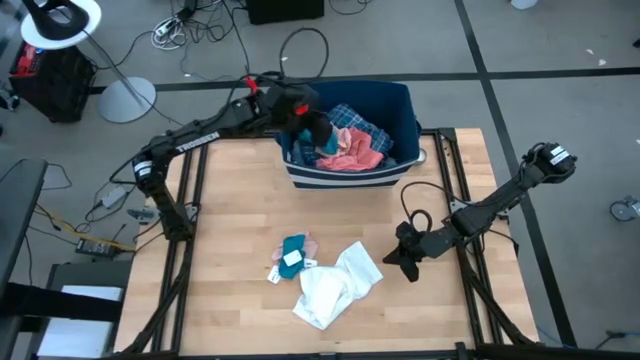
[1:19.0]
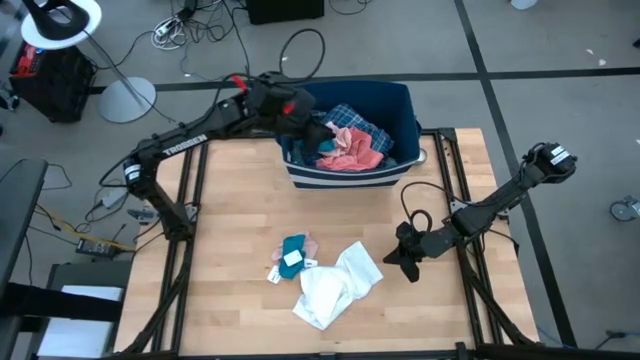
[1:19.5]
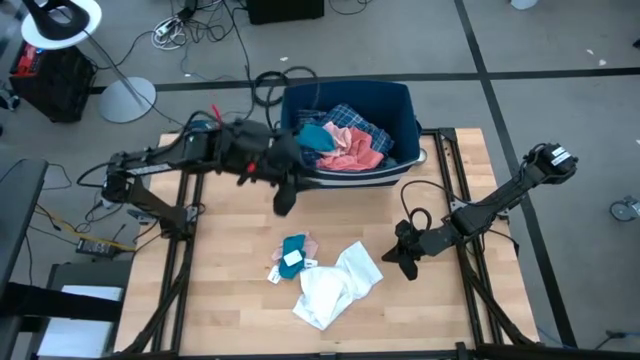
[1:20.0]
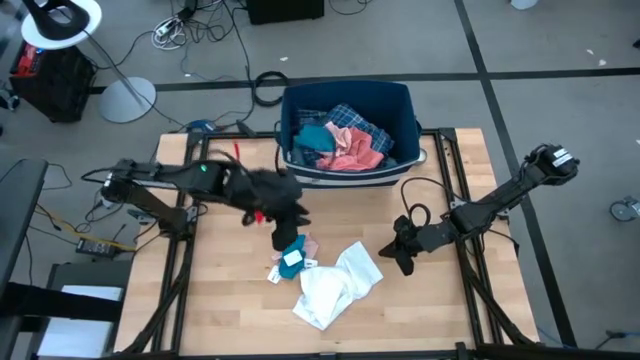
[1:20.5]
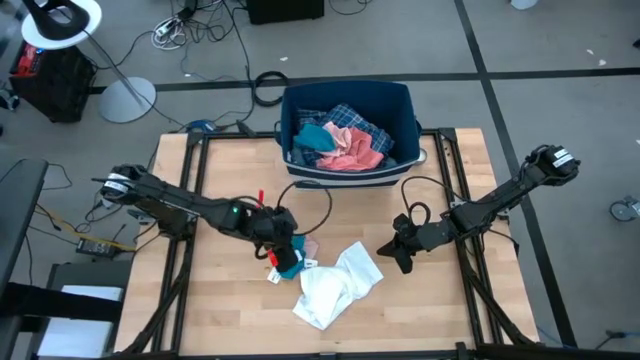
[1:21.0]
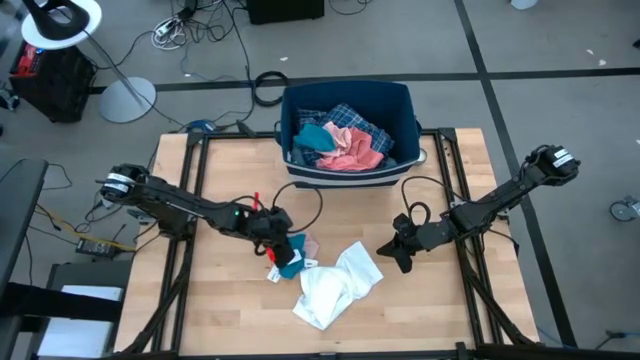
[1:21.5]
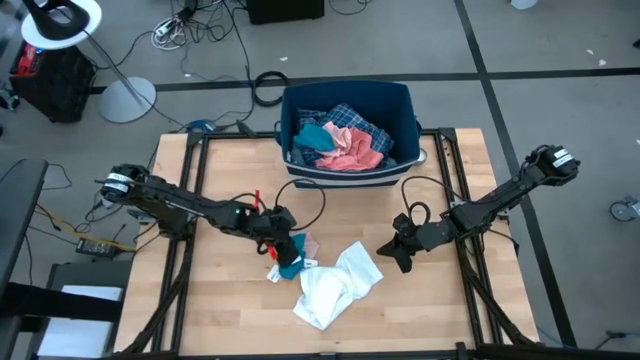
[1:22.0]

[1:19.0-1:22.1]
Task: Sort clothes
Put the blue socks into the blue bin

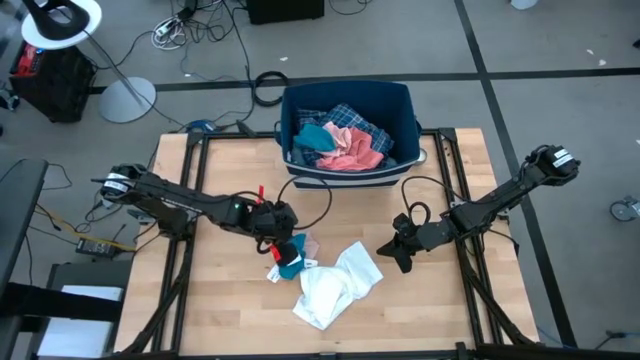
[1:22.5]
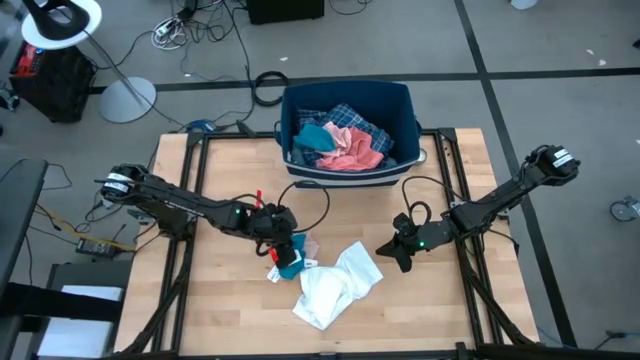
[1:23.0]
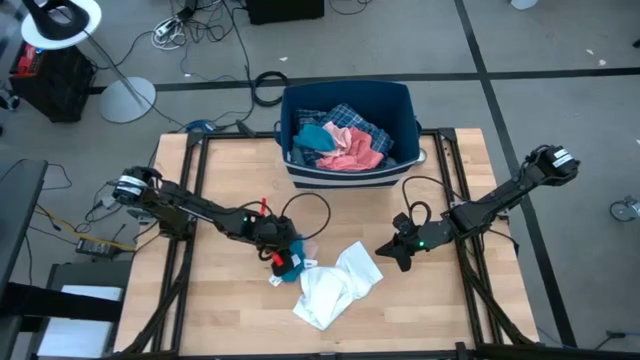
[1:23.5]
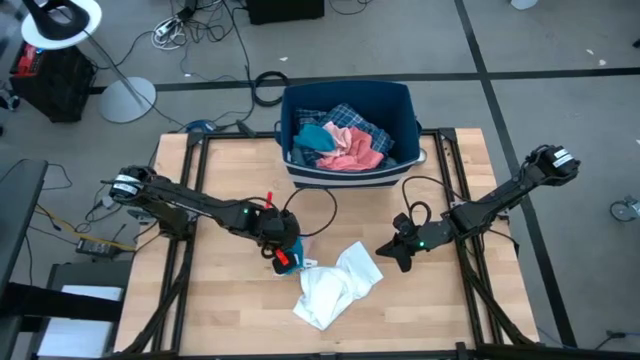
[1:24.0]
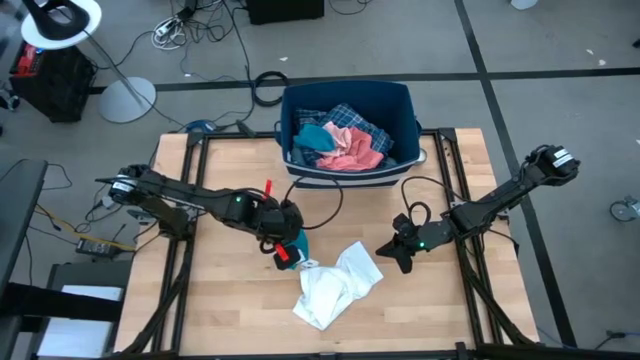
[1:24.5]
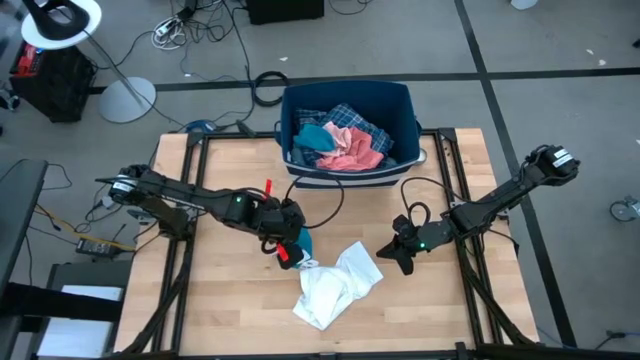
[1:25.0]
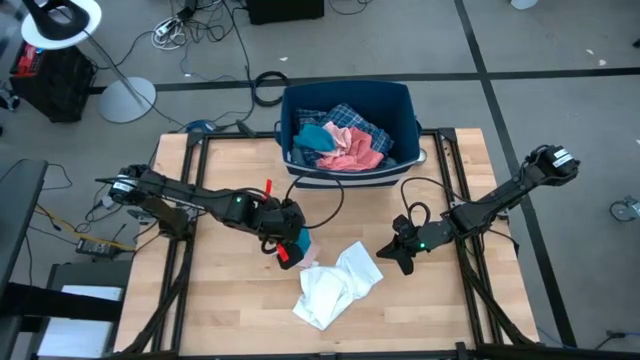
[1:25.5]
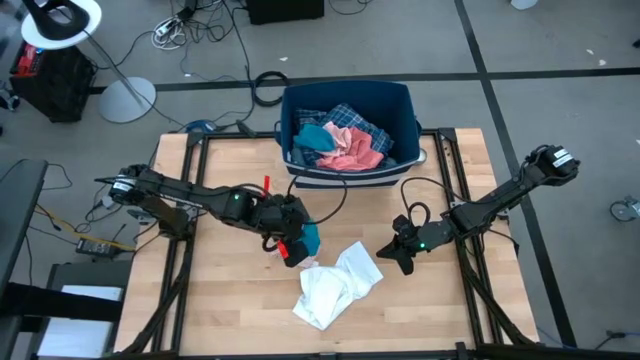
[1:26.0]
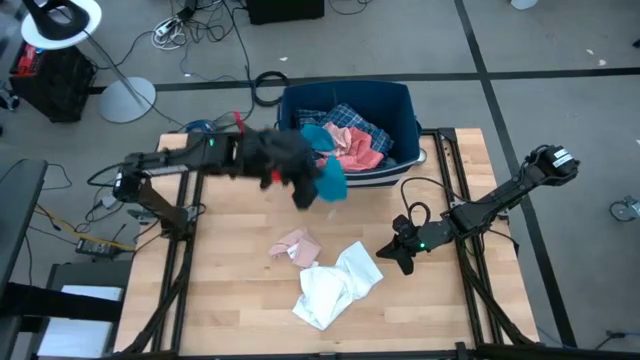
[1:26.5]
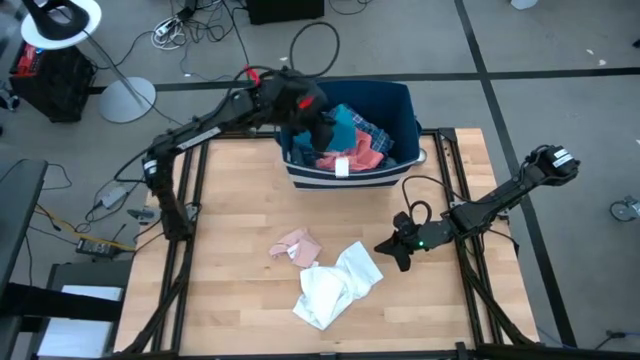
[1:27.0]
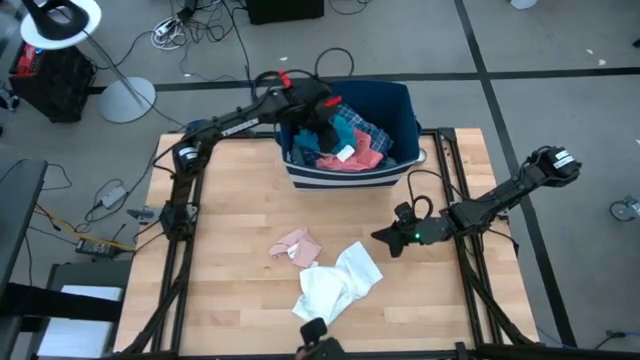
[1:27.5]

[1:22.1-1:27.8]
Put the blue socks into the blue bin

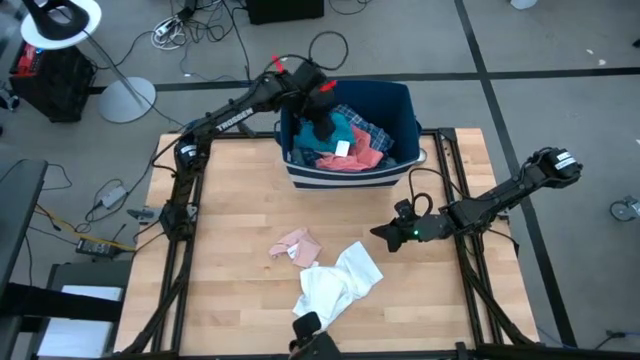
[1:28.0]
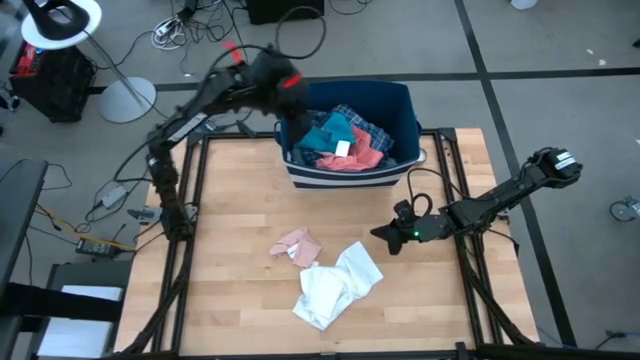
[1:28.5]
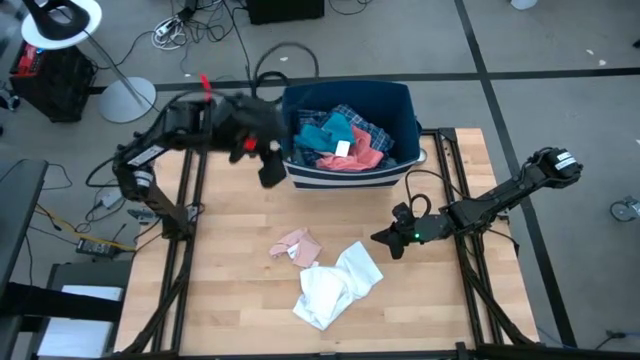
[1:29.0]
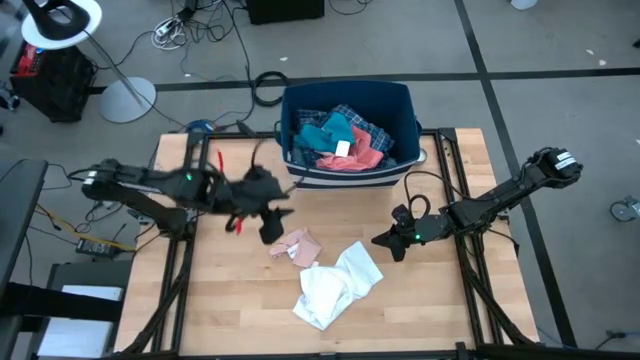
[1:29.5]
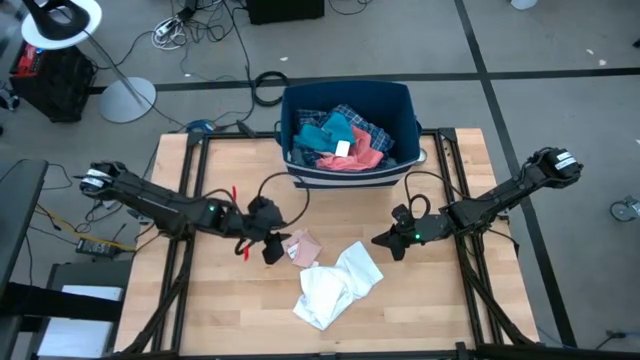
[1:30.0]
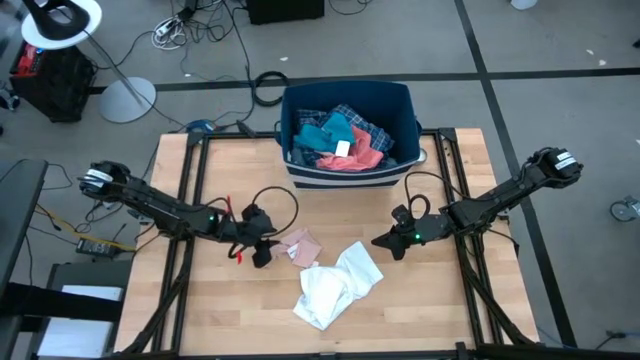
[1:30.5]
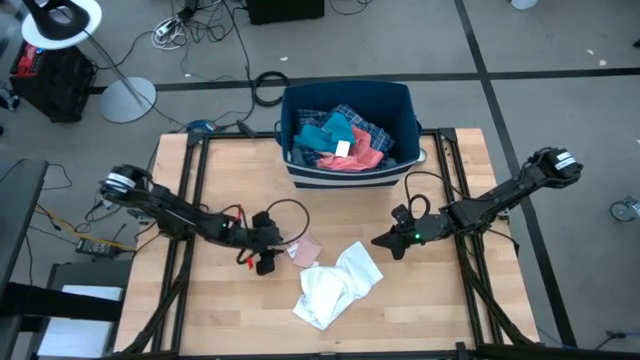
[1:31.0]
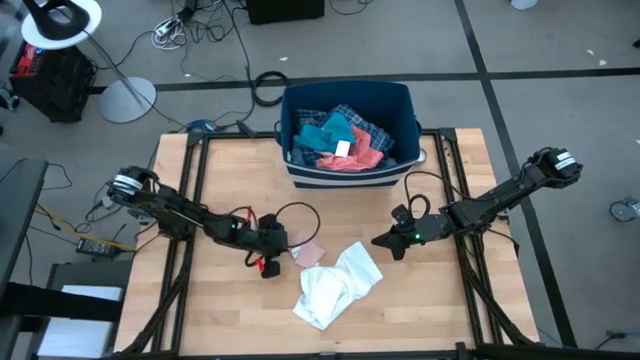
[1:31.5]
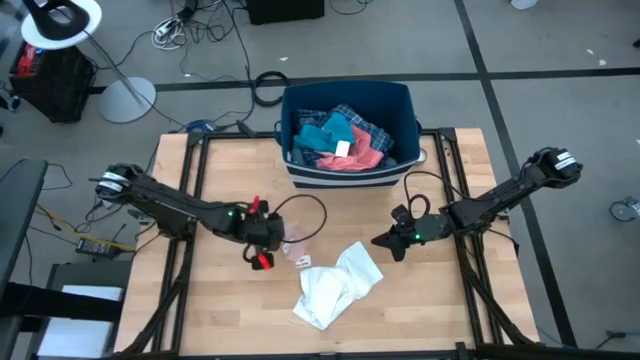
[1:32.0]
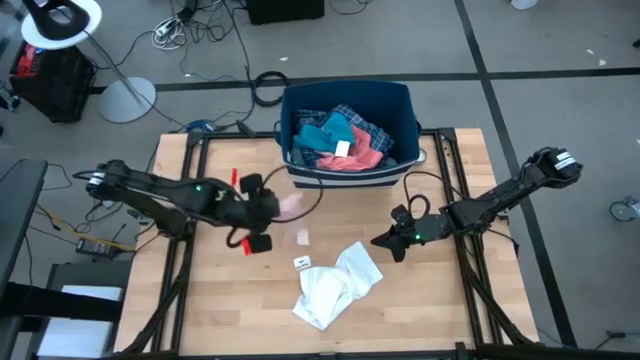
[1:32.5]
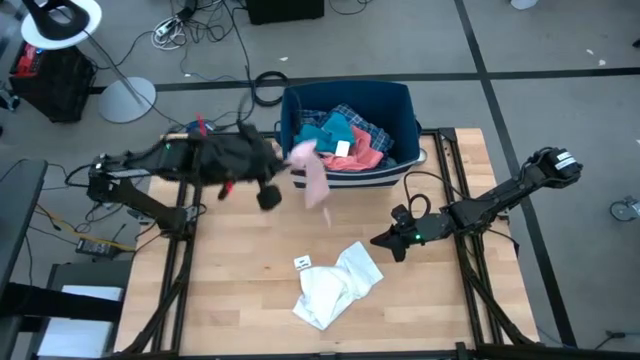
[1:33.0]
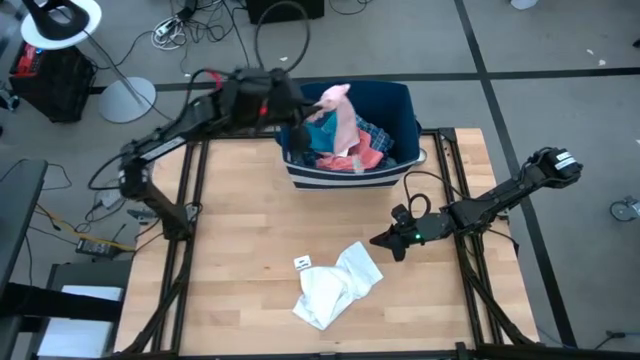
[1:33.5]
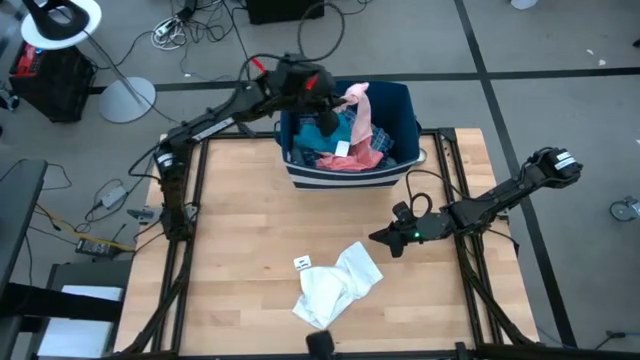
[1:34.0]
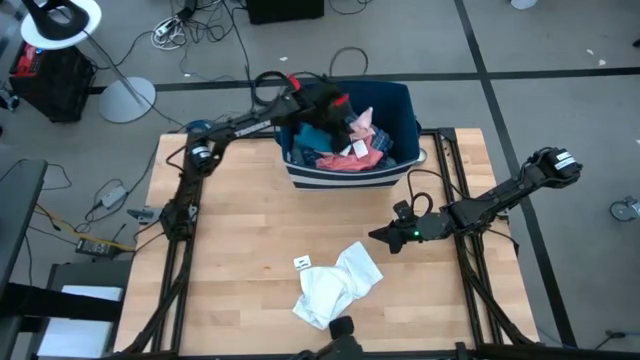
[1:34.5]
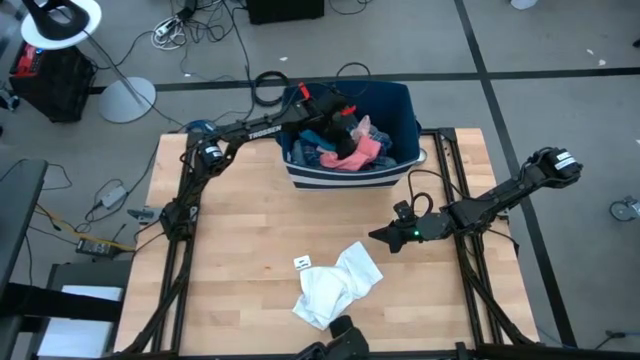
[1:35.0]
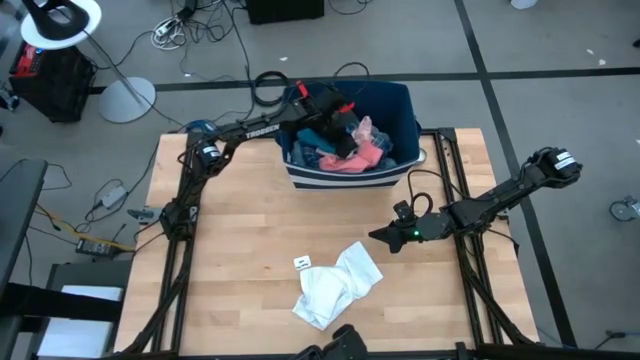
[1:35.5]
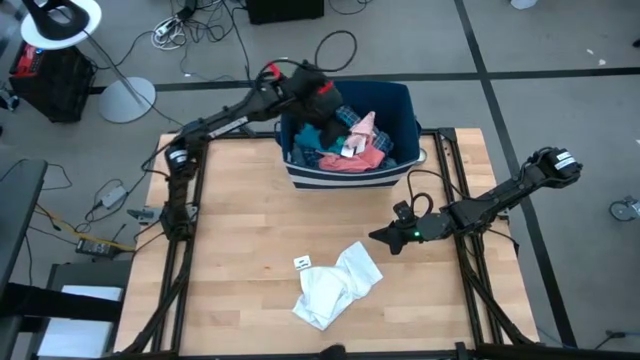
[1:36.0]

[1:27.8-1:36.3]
Put the light pink socks into the blue bin

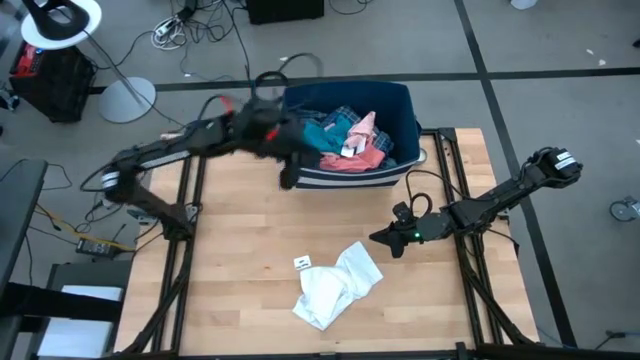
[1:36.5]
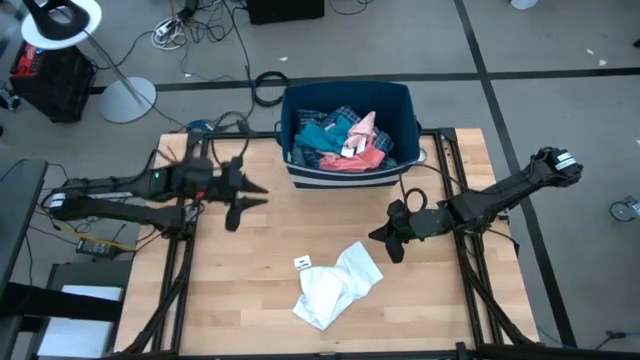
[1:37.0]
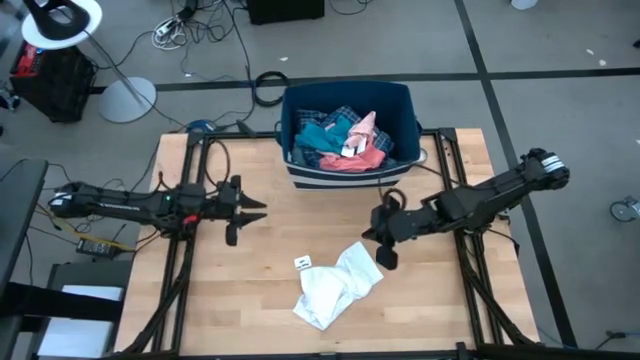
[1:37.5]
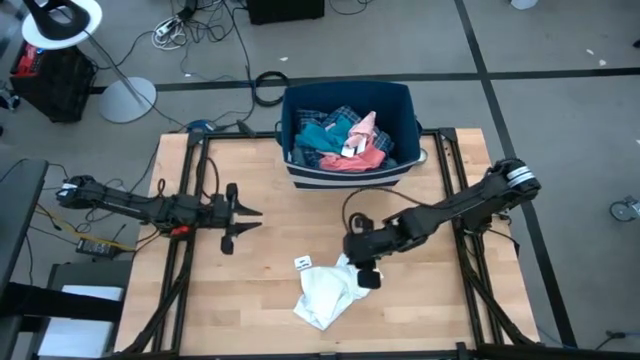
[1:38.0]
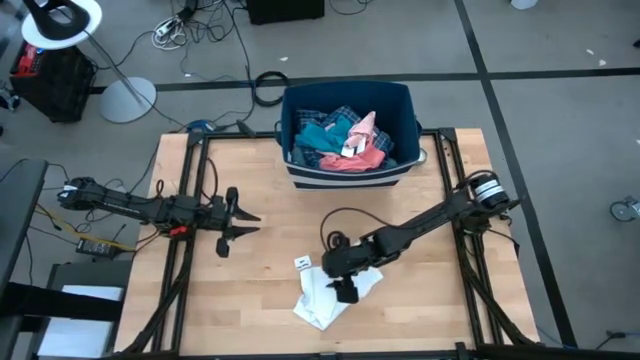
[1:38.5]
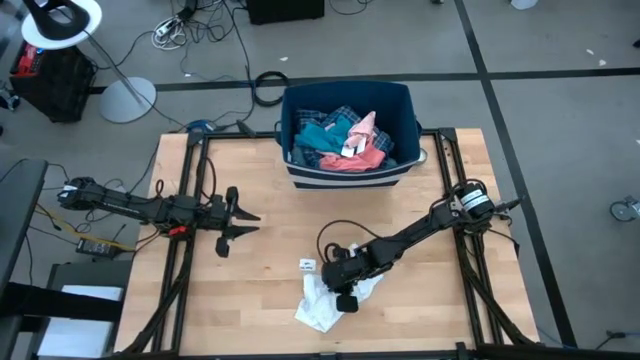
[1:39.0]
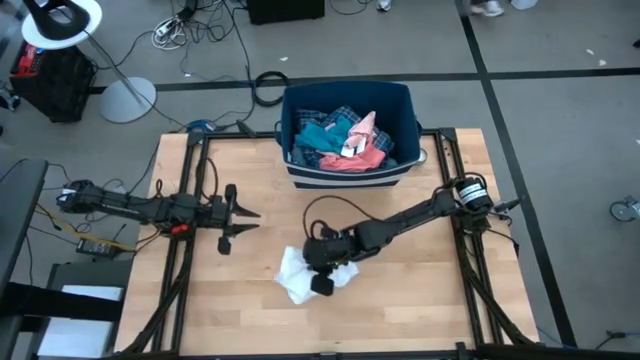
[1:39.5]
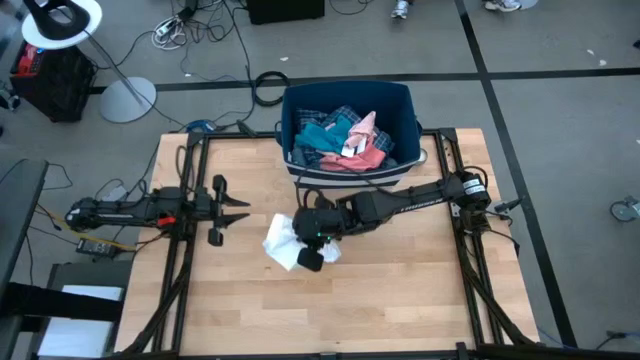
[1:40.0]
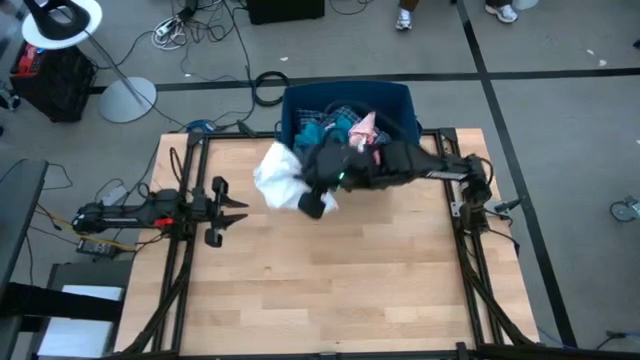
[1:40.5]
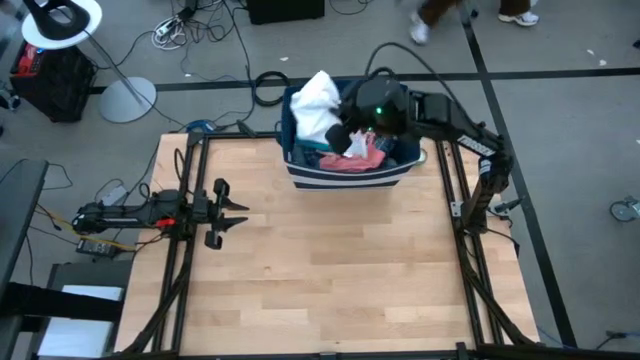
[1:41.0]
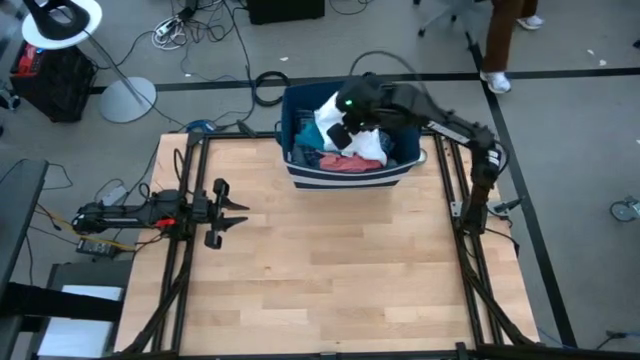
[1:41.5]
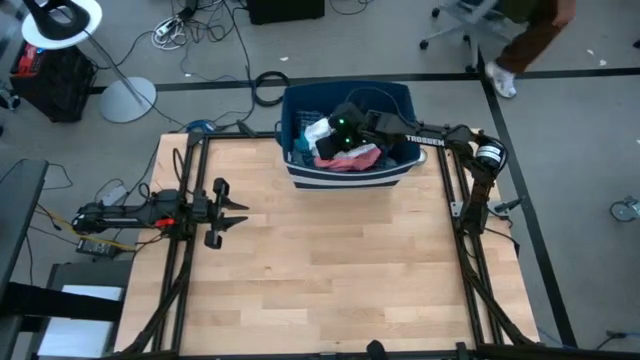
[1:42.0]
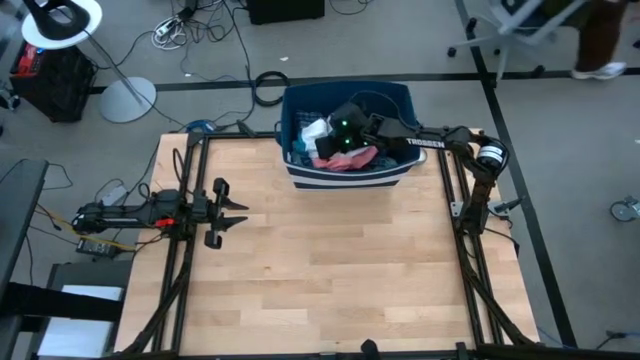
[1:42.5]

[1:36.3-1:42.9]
Put the white shorts into the blue bin
